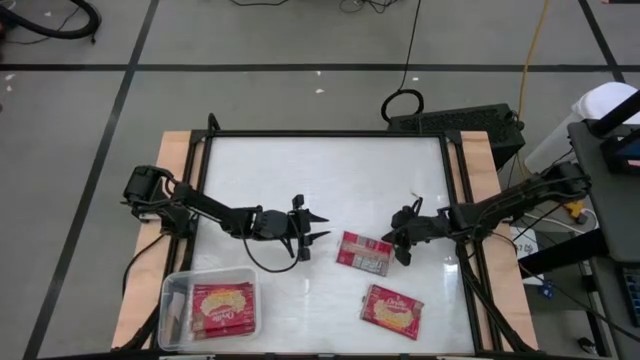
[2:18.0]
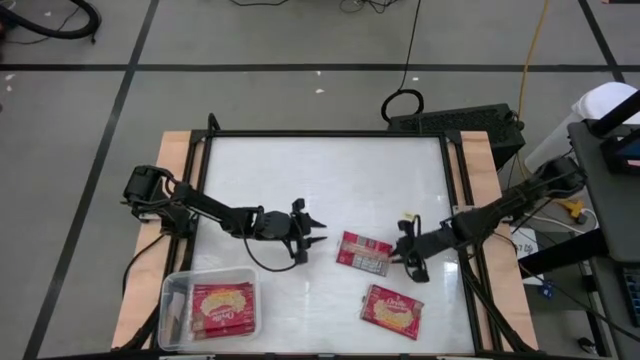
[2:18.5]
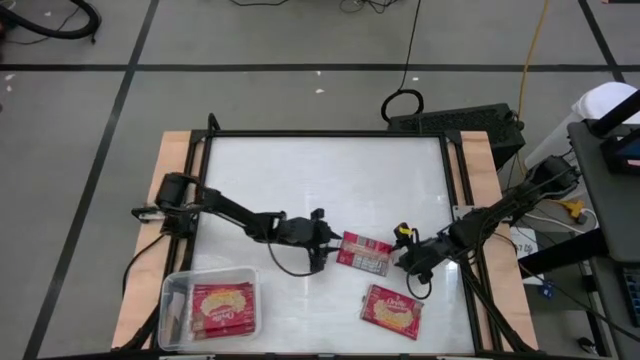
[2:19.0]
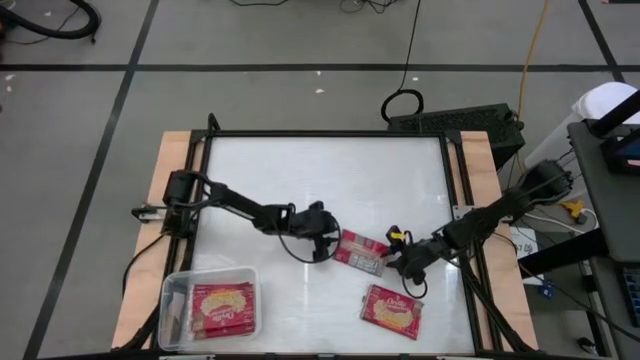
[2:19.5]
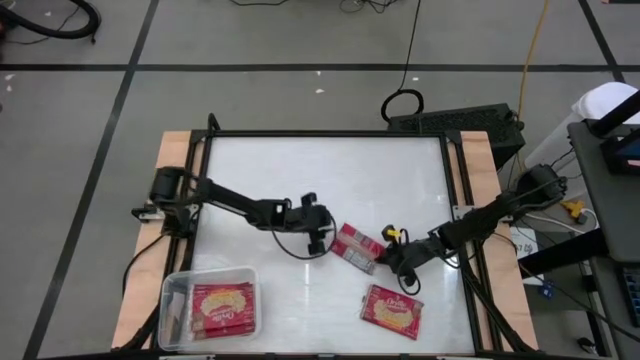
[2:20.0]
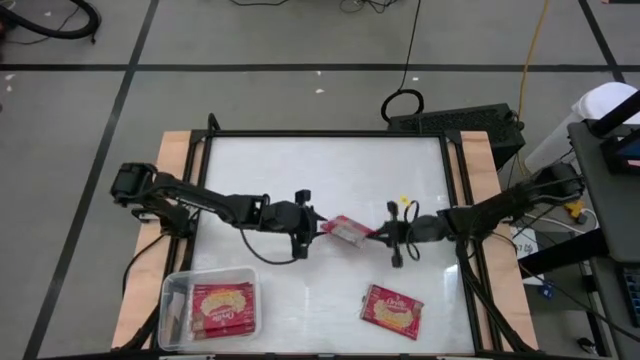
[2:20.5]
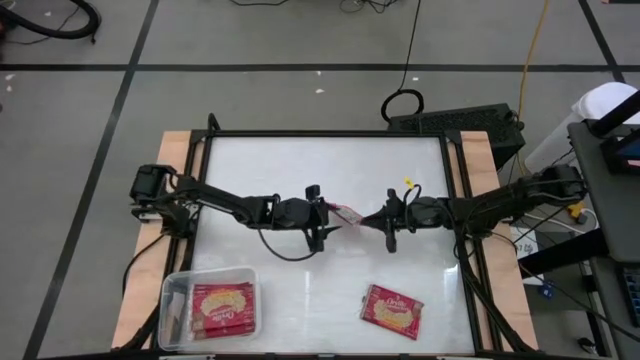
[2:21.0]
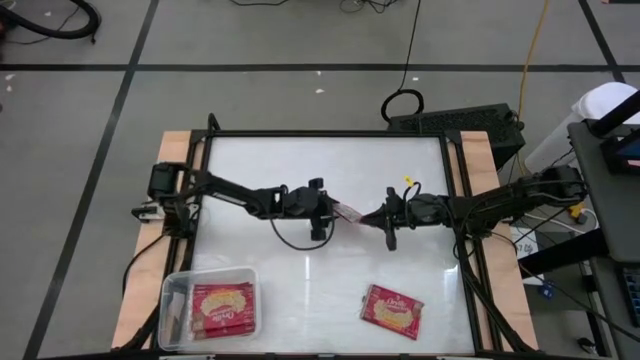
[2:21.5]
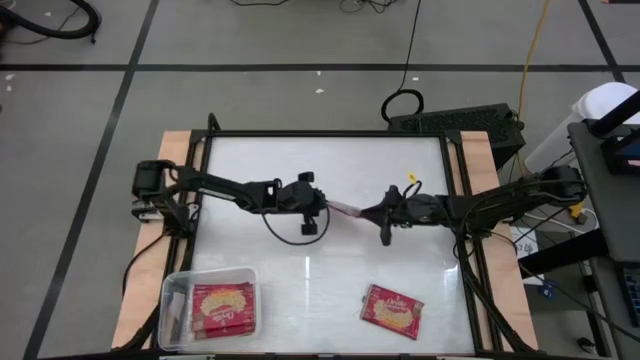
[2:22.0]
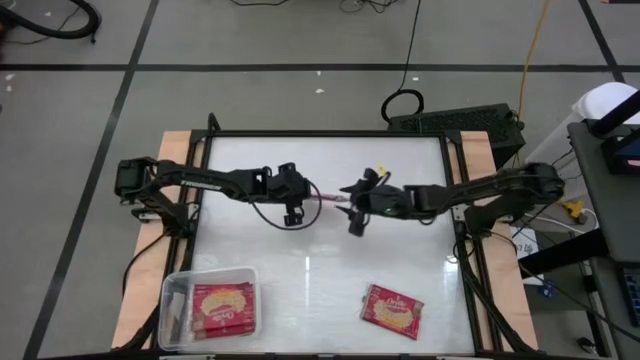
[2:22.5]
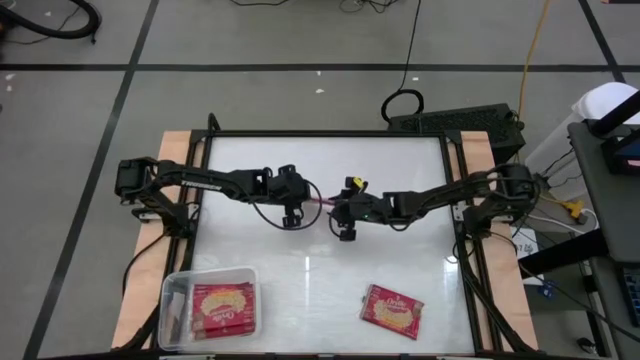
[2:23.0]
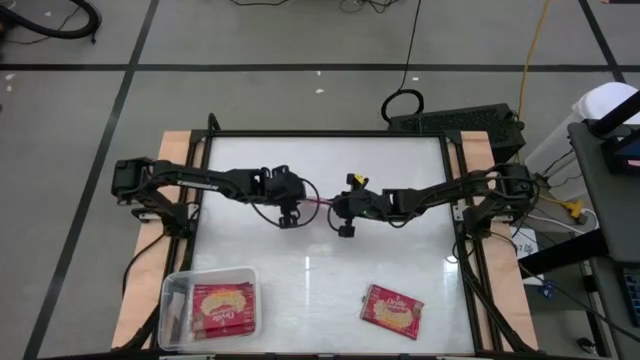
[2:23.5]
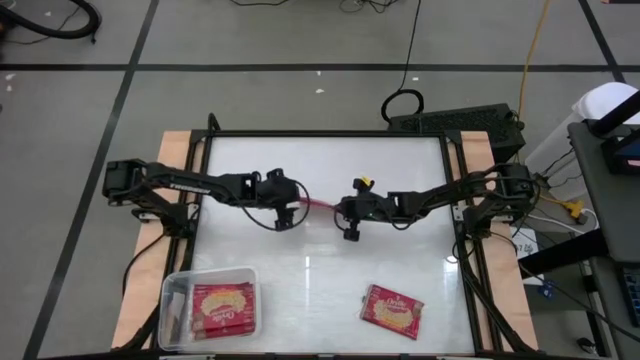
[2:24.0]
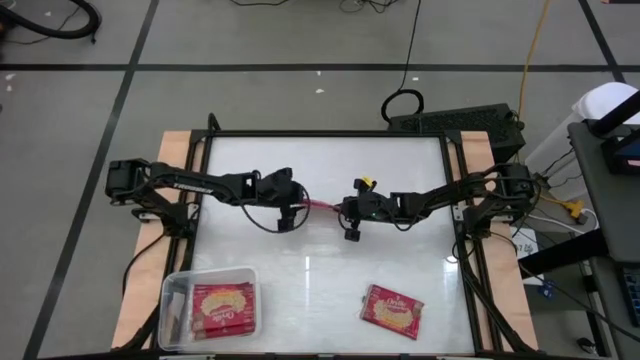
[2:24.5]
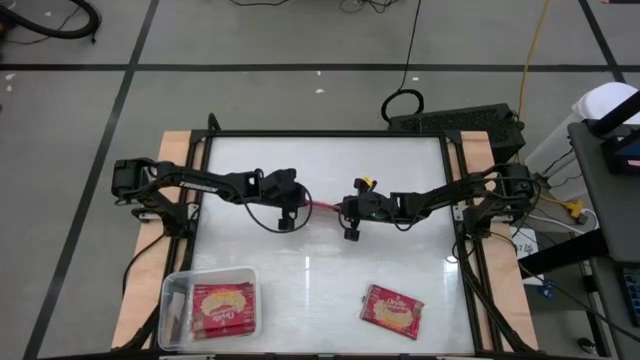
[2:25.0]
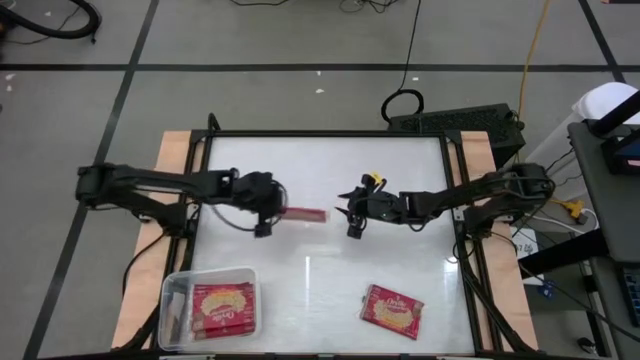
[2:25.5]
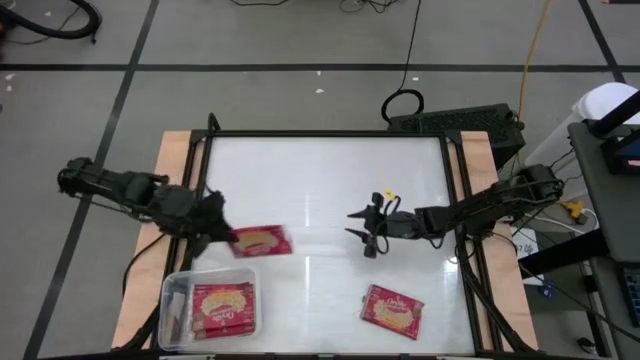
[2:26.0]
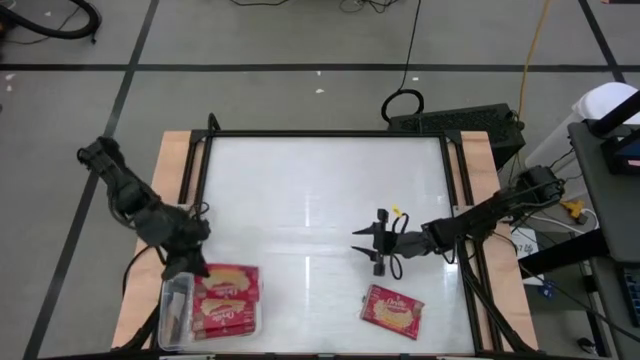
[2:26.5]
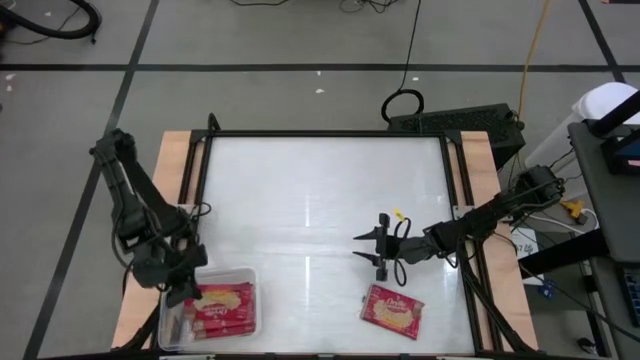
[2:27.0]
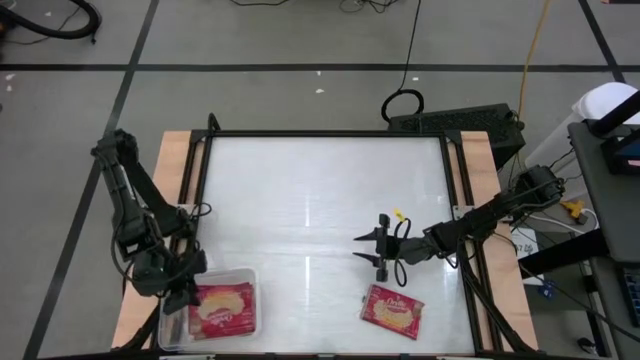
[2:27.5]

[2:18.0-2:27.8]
Task: Sort popcorn bags into baskets
Put the popcorn bag into the transparent bin

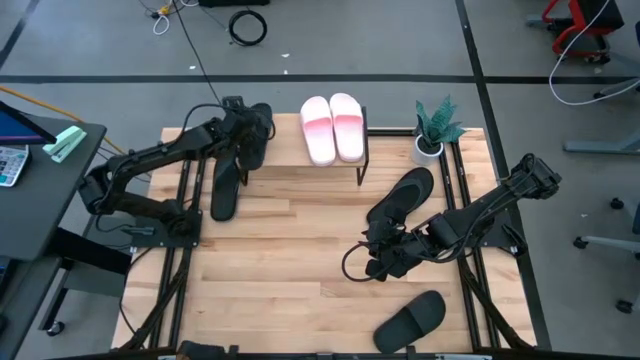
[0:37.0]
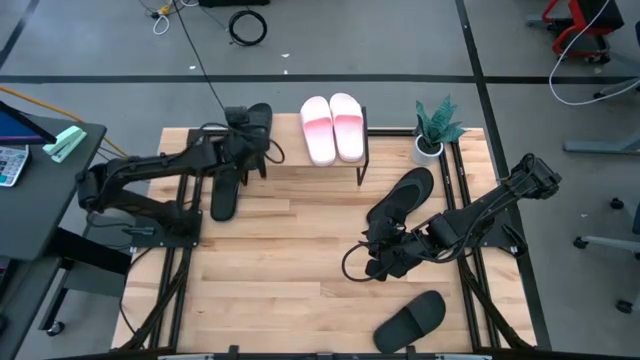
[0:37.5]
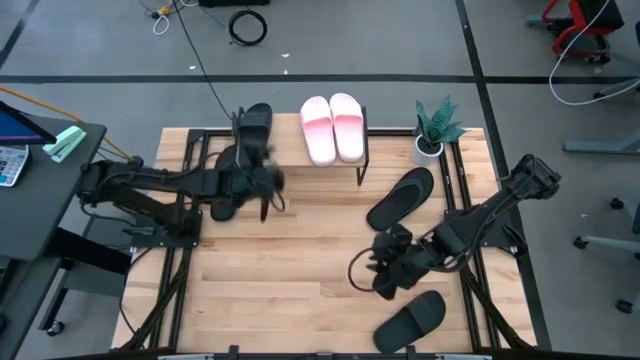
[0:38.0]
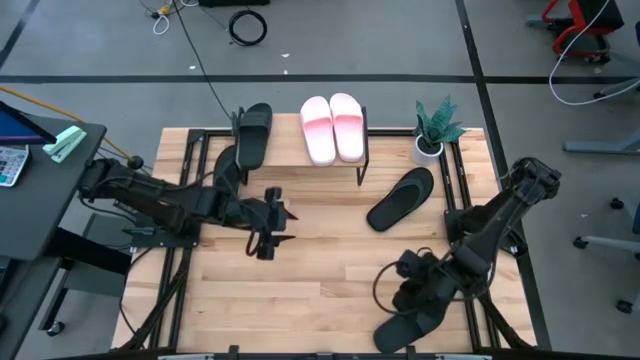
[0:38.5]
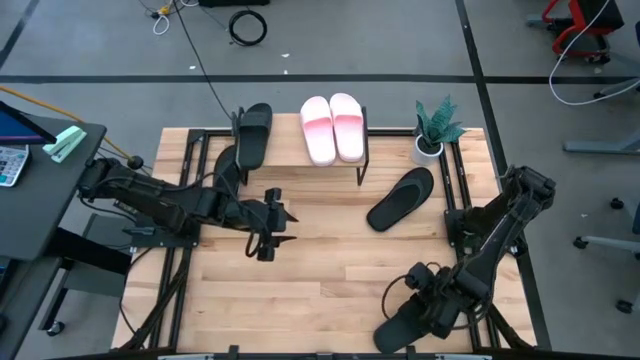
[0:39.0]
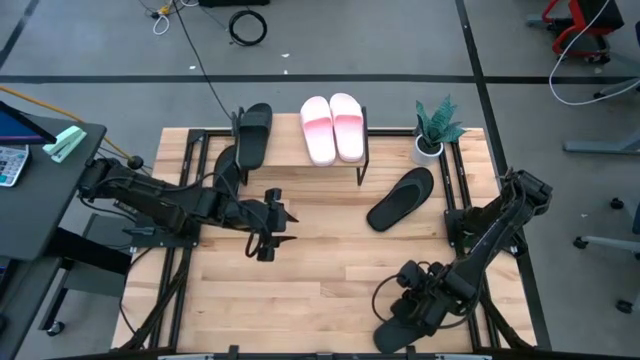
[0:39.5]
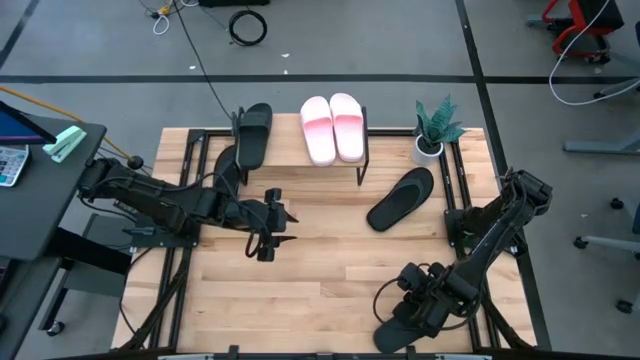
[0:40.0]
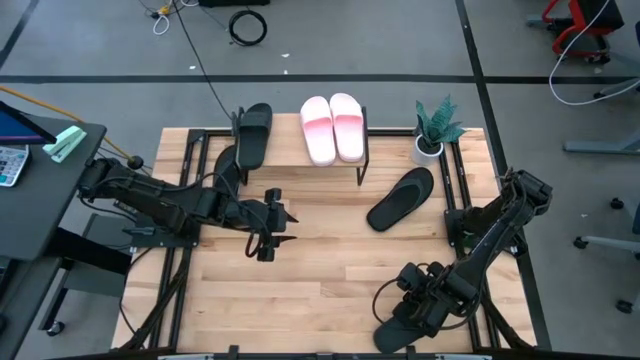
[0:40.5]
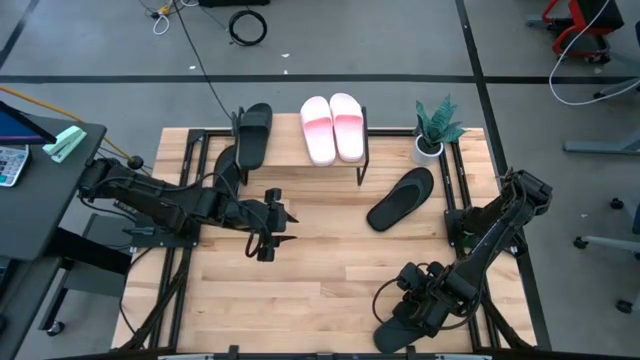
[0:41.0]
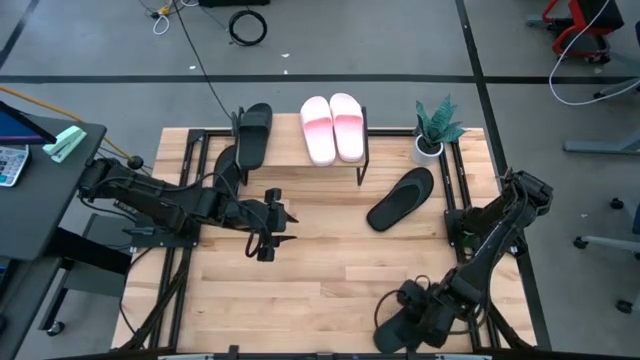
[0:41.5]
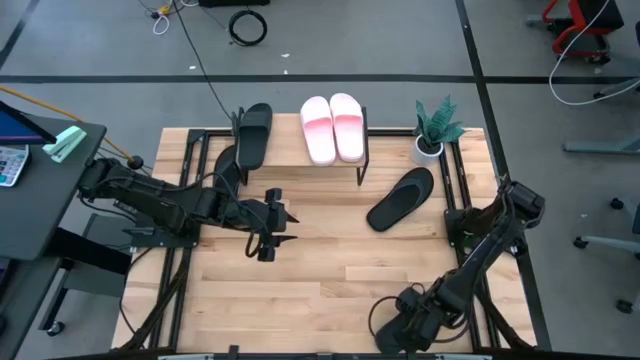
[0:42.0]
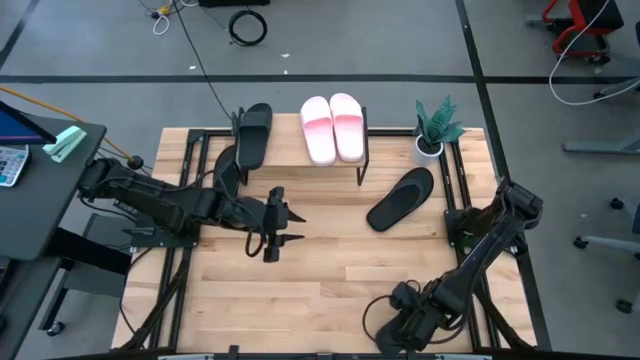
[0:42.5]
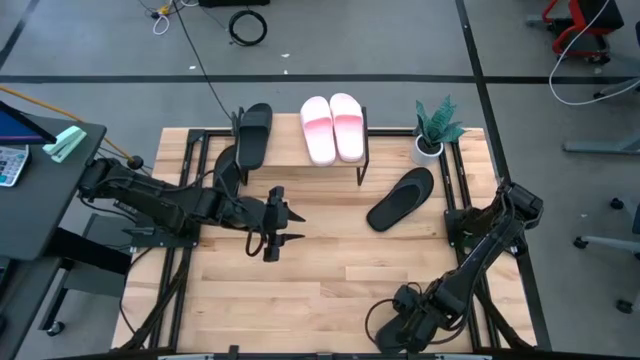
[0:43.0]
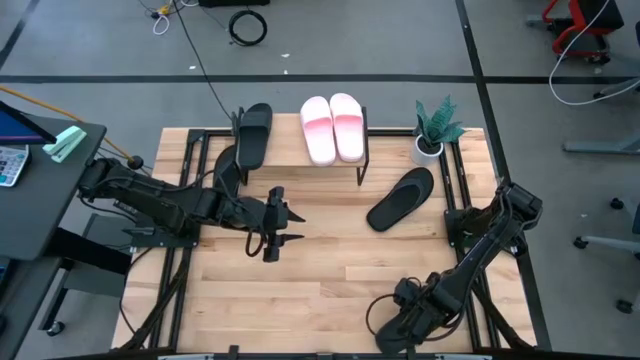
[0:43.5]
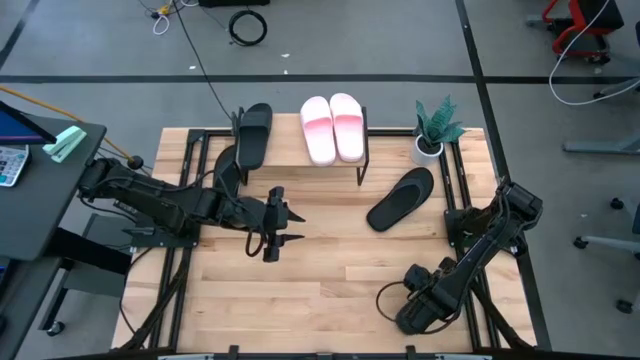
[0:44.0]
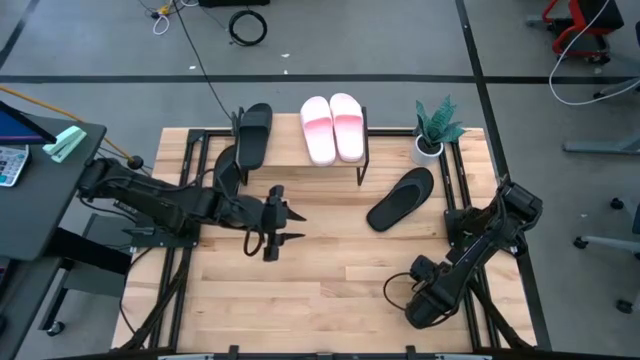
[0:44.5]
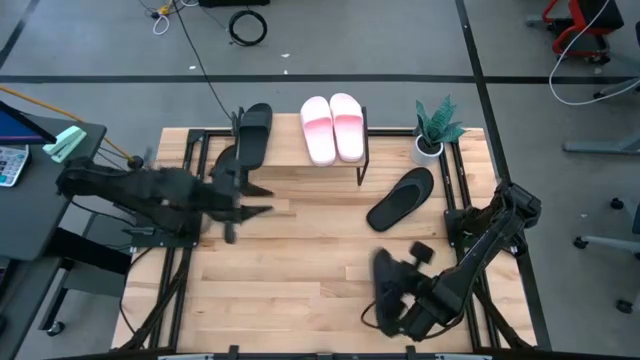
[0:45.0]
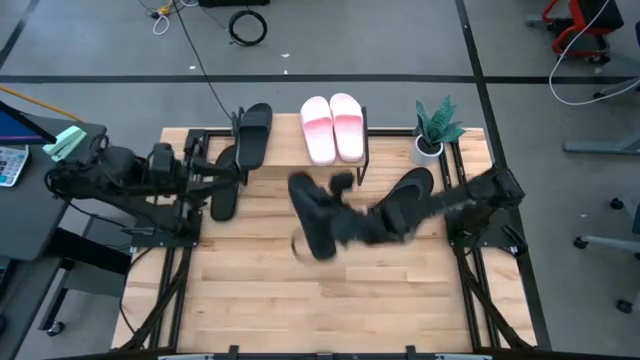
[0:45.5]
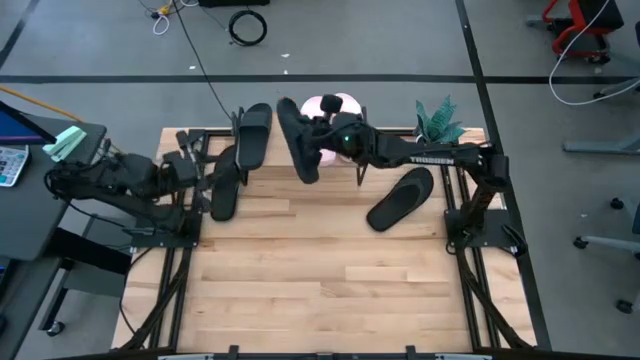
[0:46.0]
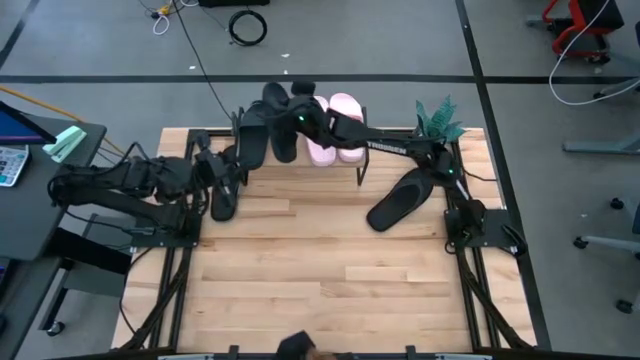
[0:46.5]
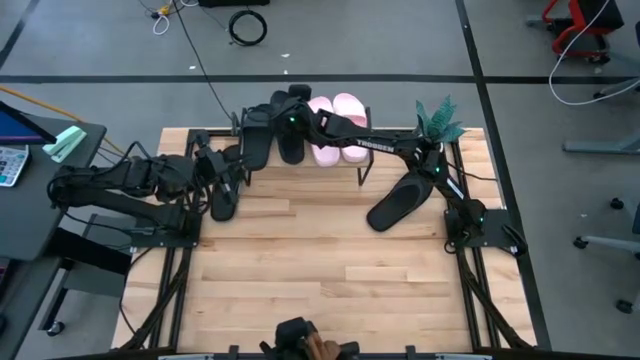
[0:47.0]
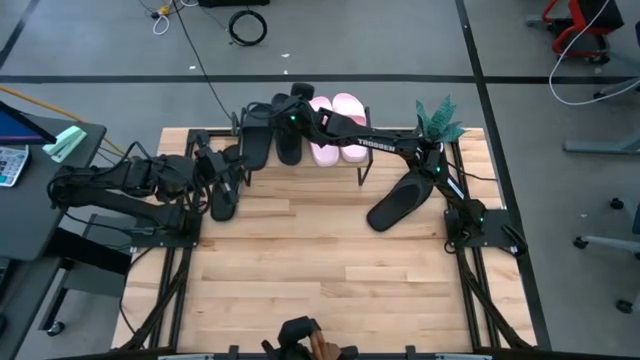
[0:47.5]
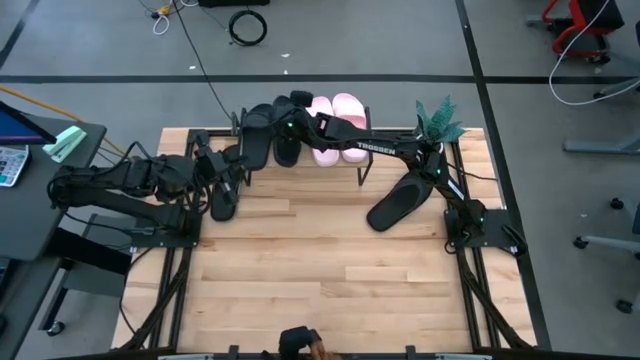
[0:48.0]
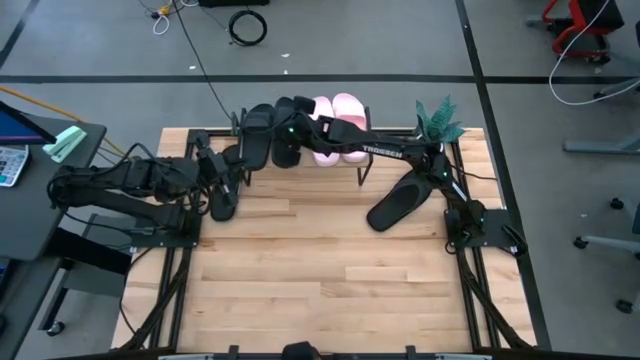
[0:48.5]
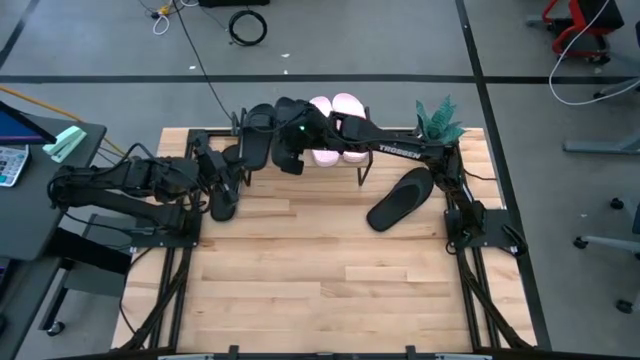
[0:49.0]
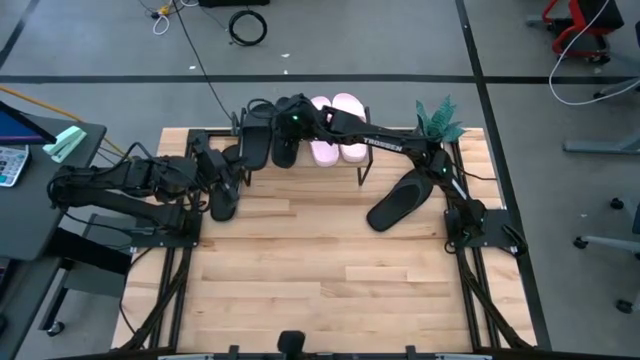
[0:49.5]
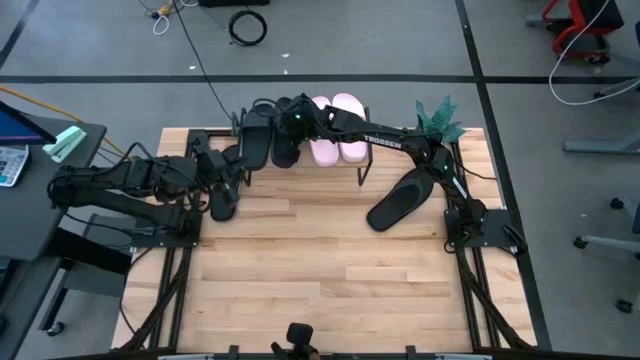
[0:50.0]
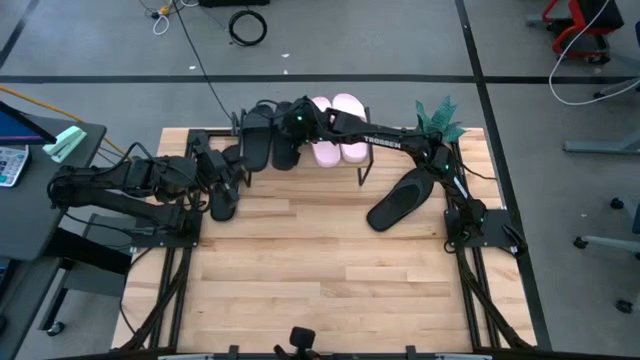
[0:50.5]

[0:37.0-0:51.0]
Task: Pick and place slides into the shelf
Align the black slide on the shelf with the other black slide
